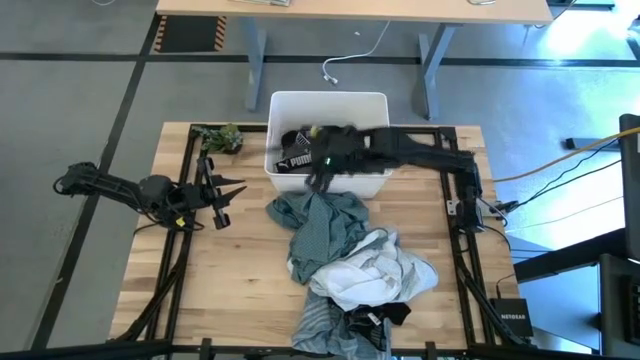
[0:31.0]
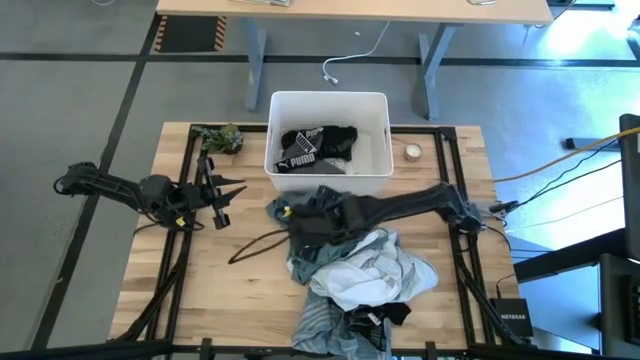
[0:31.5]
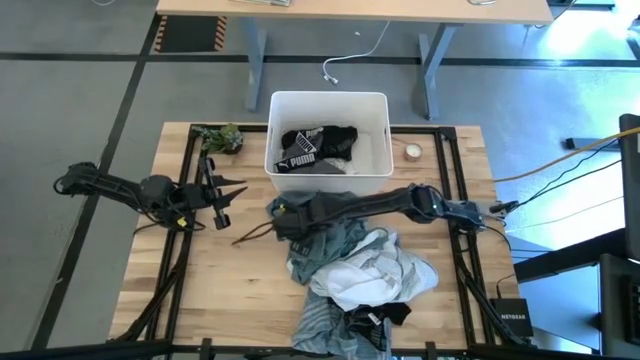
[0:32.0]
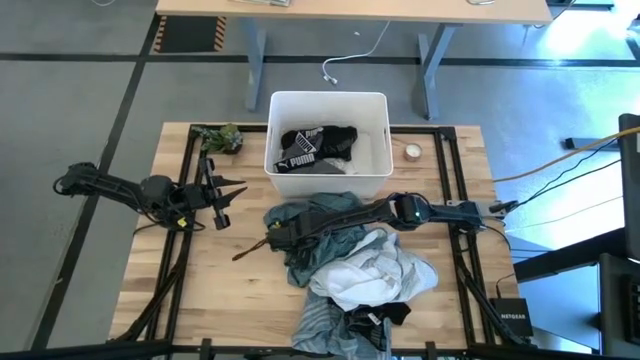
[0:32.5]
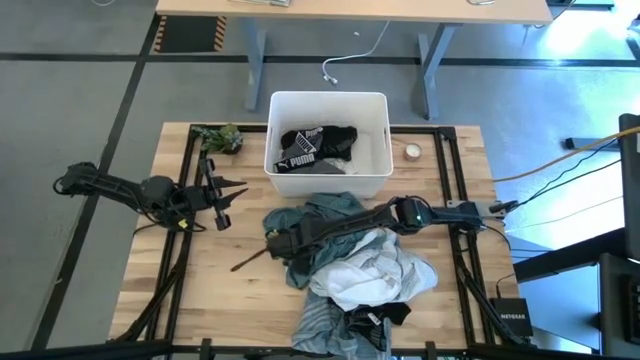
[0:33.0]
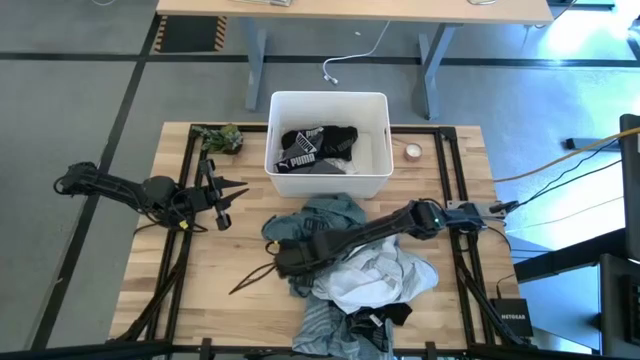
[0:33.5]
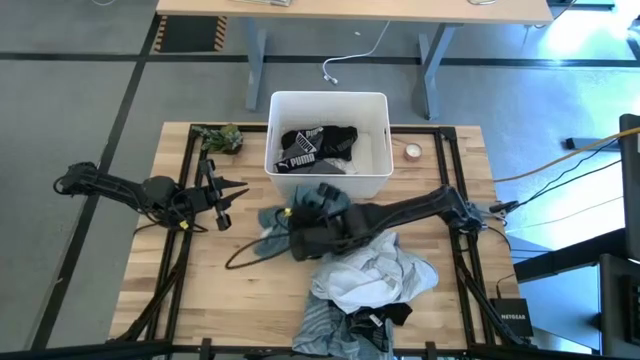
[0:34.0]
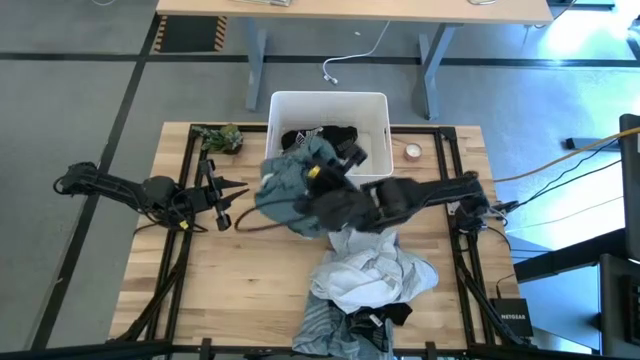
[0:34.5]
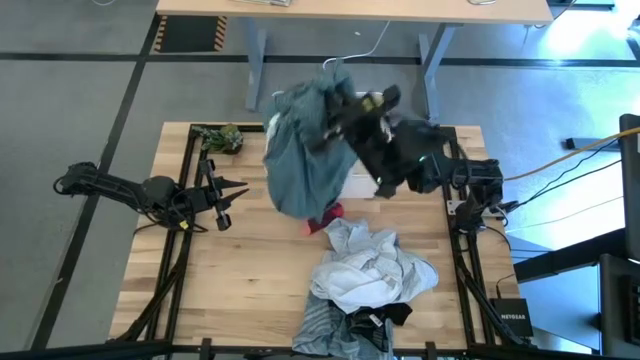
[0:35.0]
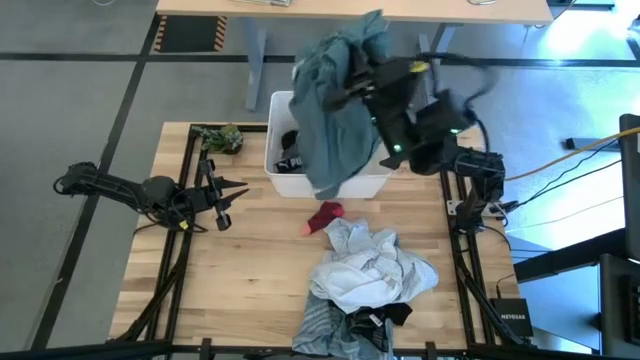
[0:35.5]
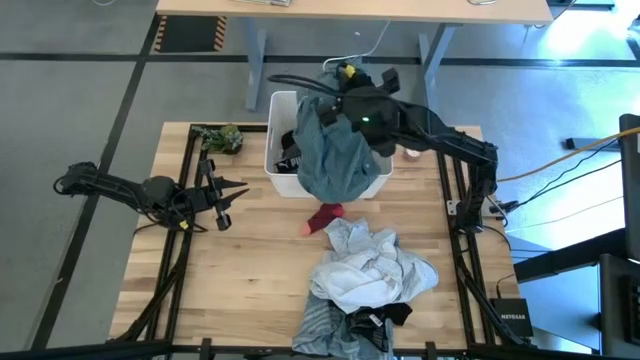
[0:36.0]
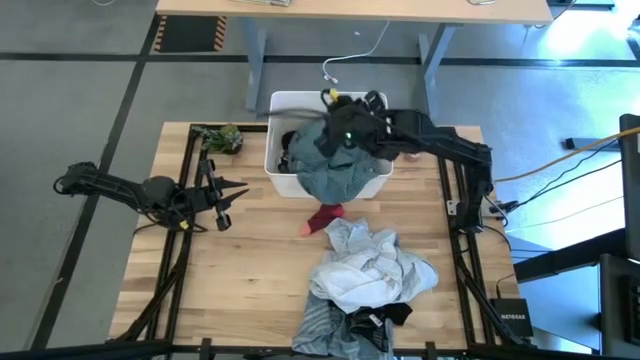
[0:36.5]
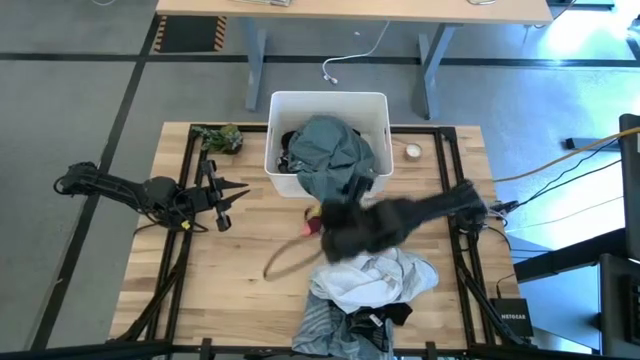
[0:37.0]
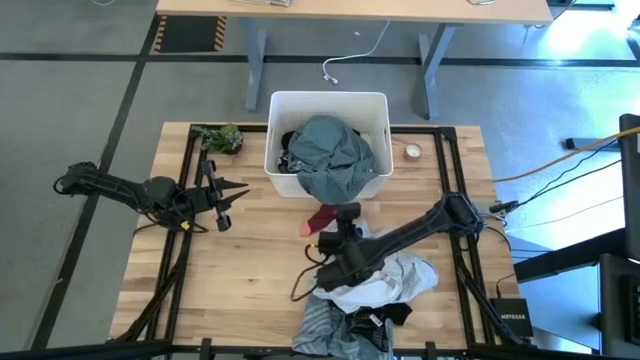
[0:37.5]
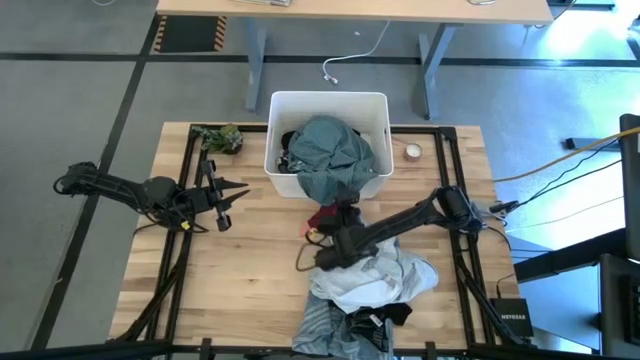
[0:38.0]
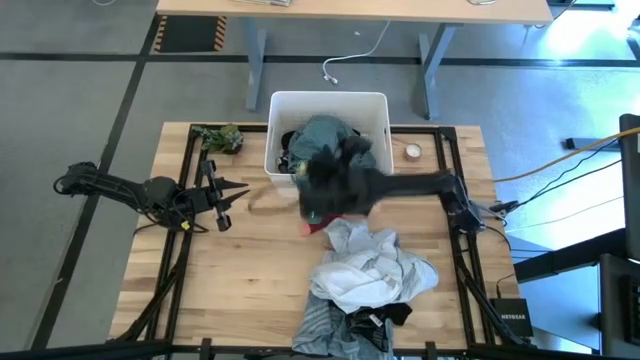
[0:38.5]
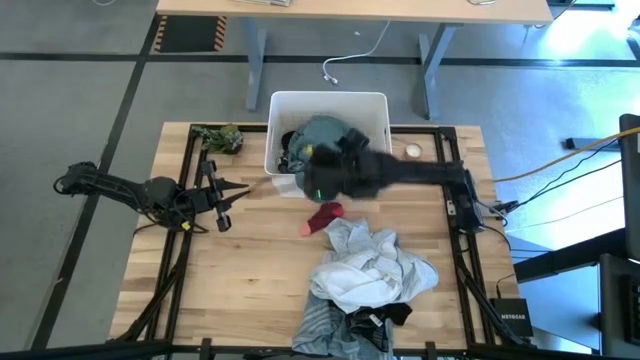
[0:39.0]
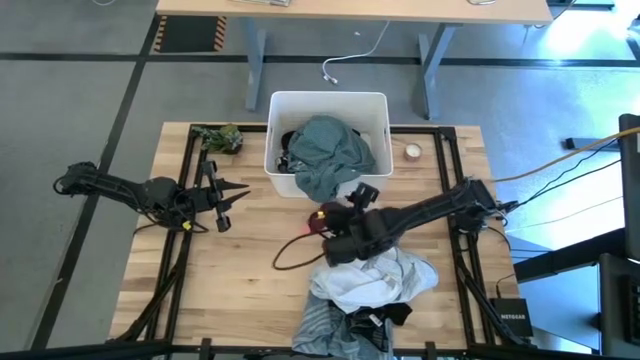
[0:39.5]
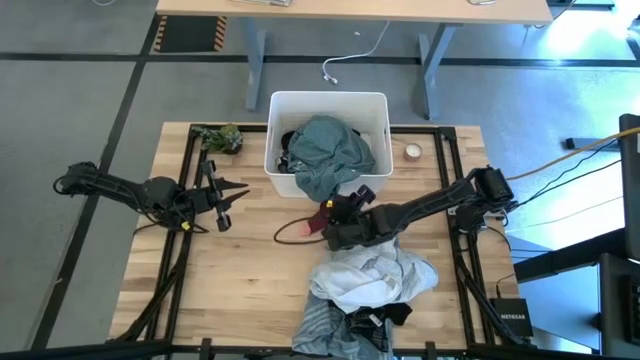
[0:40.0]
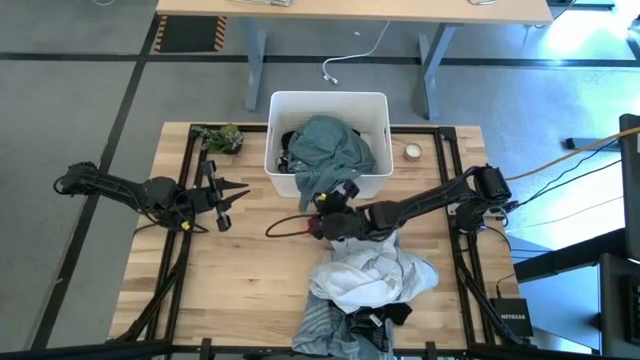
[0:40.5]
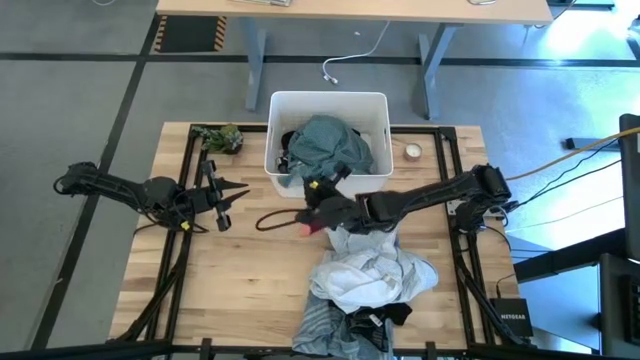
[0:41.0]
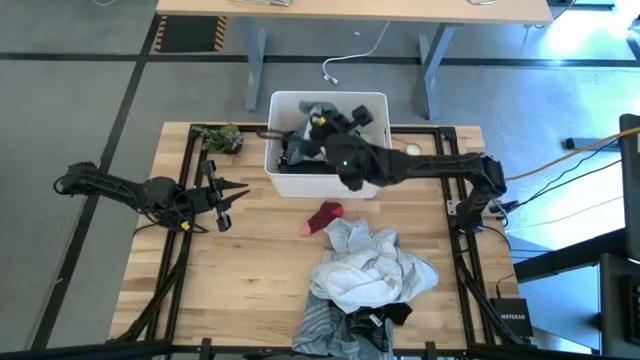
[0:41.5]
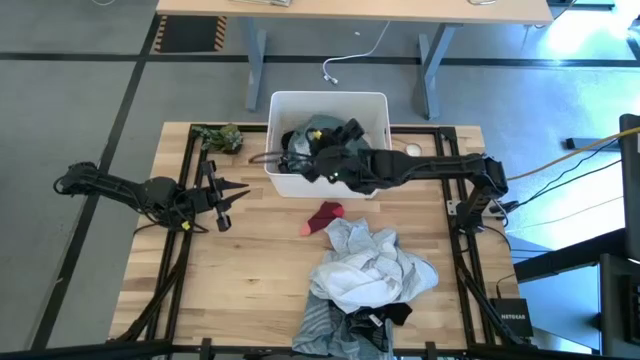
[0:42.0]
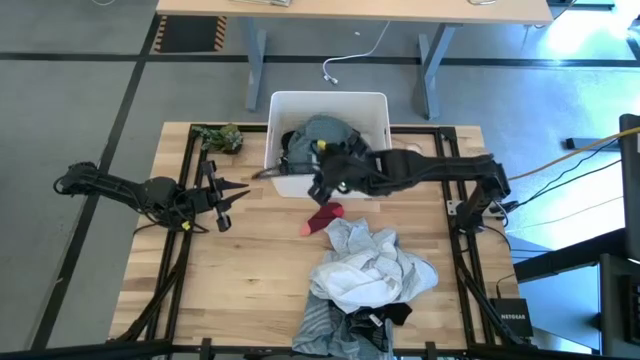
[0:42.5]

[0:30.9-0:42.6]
Task: Sort clothes
Put the blue patterned shirt into the white laundry bin

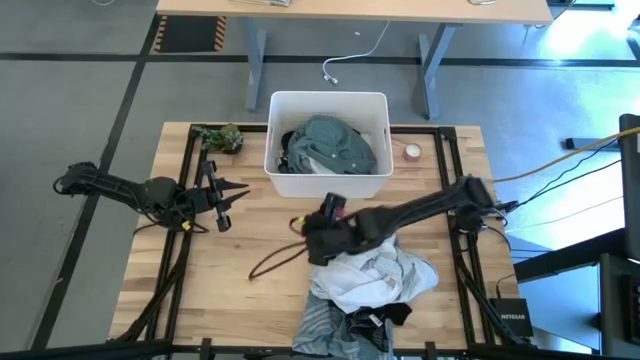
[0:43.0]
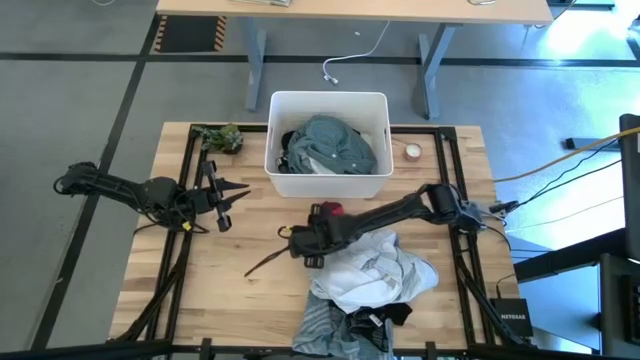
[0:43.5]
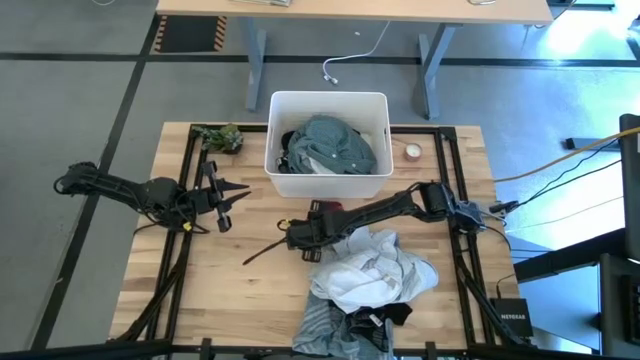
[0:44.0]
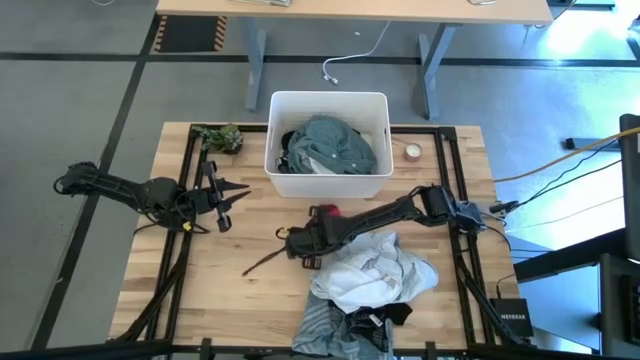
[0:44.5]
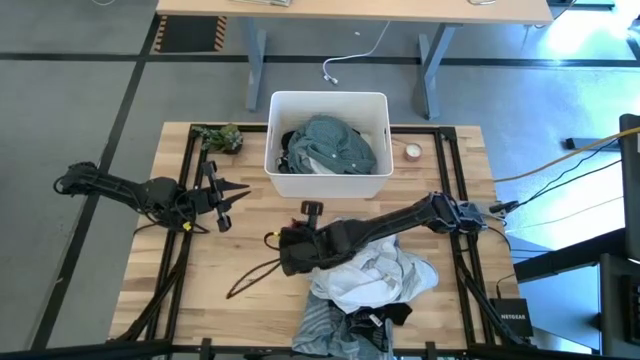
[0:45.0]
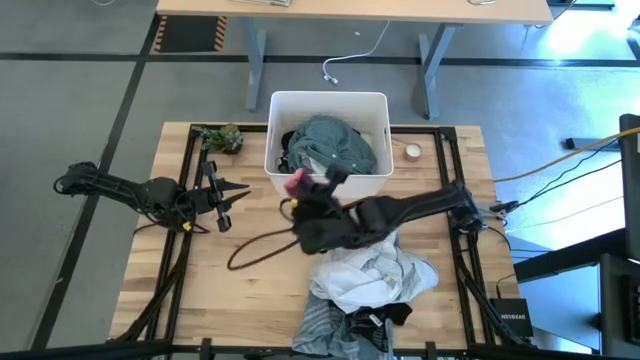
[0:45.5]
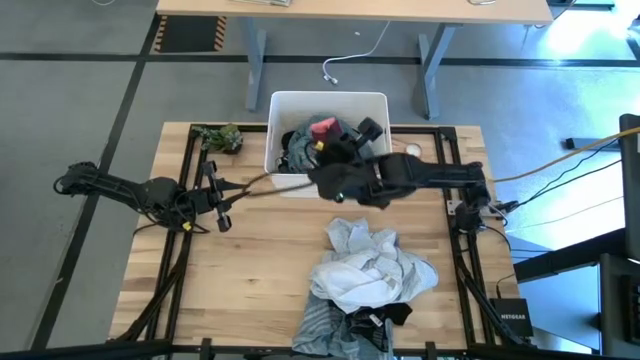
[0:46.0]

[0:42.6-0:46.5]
Put the top red sock into the white laundry bin

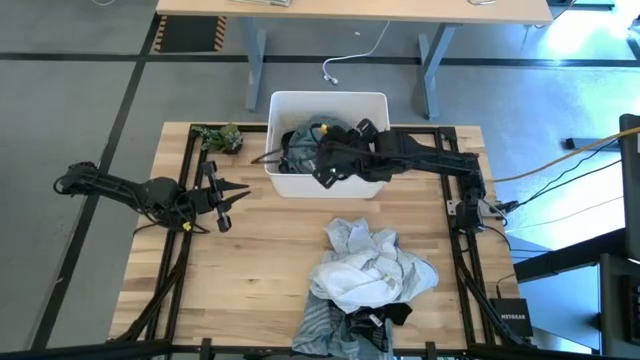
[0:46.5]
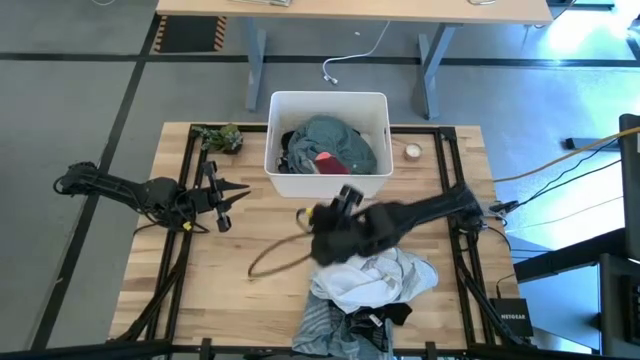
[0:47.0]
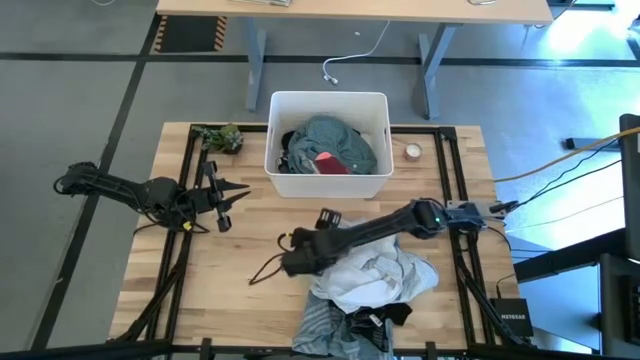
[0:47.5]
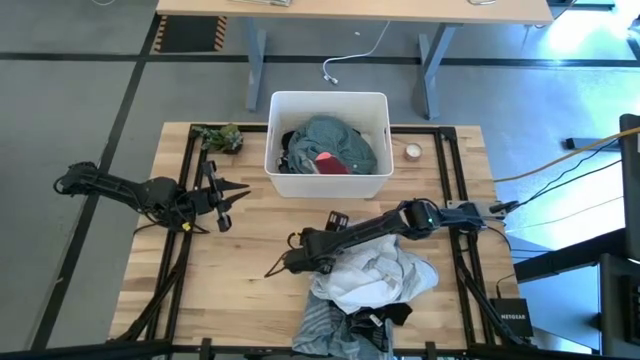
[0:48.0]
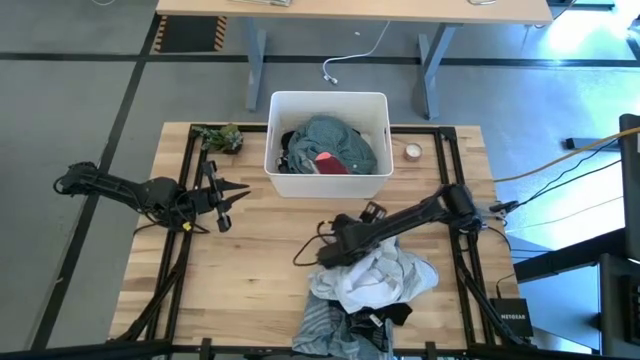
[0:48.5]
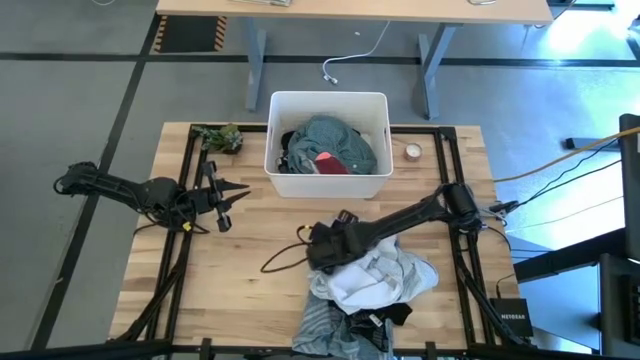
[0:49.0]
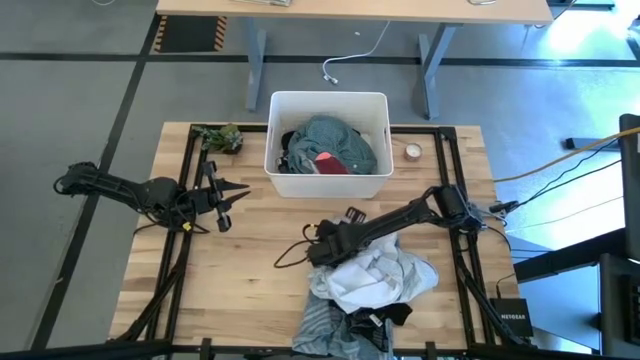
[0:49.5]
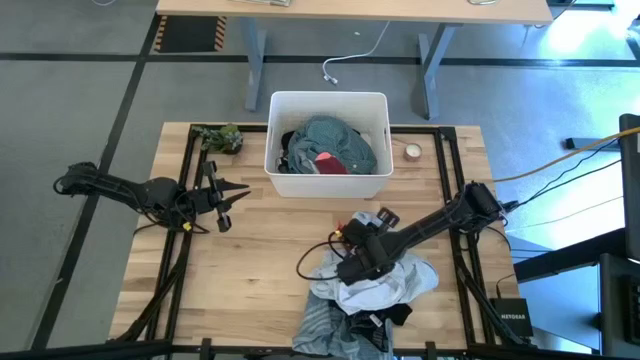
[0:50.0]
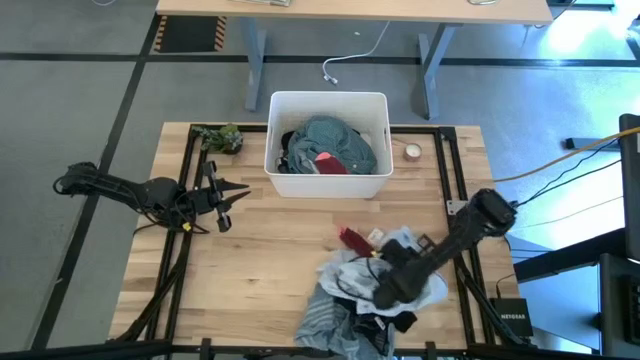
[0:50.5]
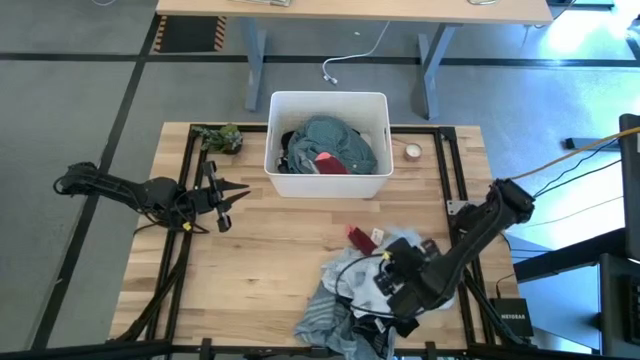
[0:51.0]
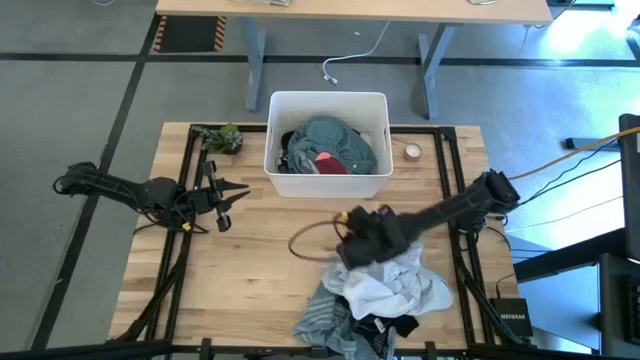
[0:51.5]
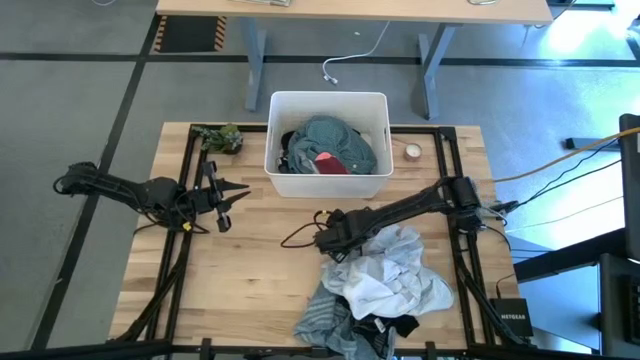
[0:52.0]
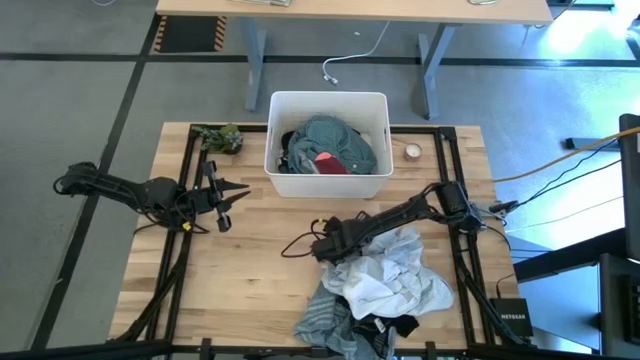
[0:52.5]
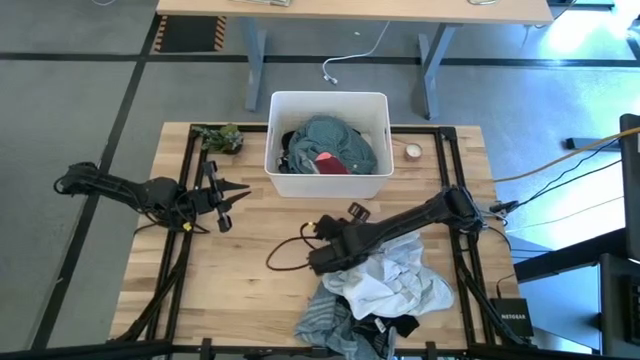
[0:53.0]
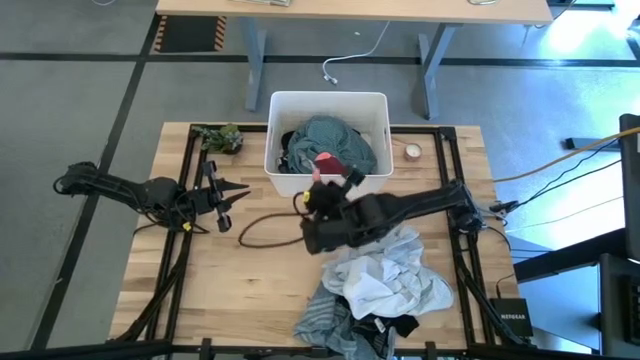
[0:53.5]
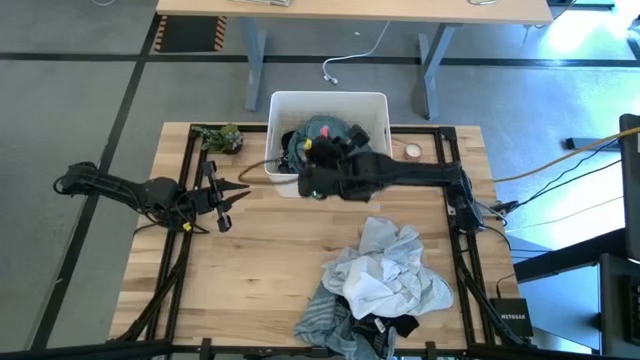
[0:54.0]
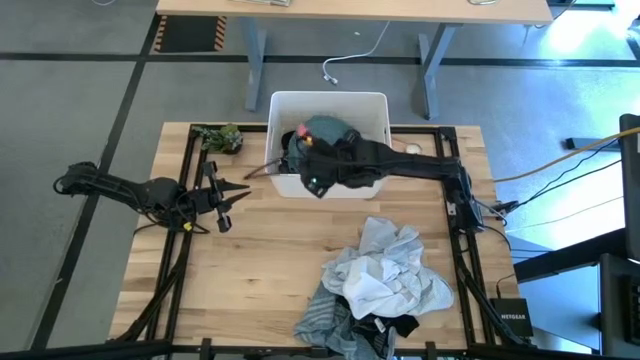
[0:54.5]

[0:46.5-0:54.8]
Put the red sock into the white laundry bin
